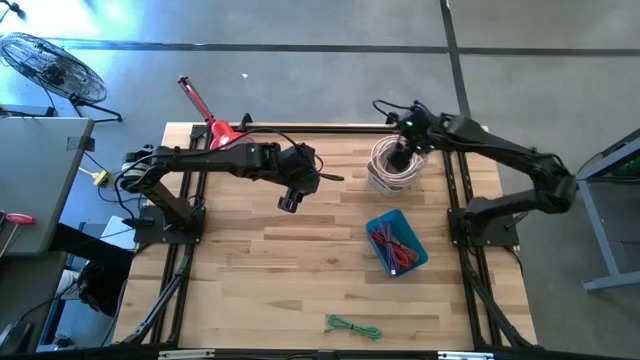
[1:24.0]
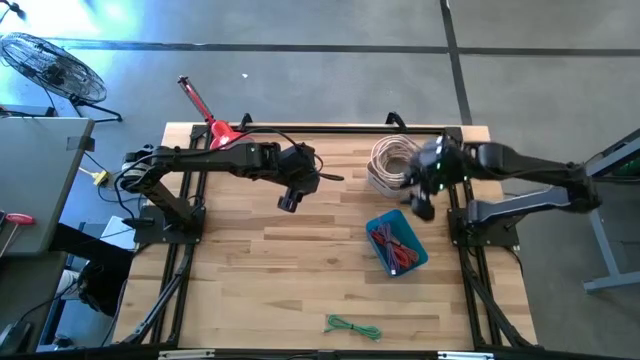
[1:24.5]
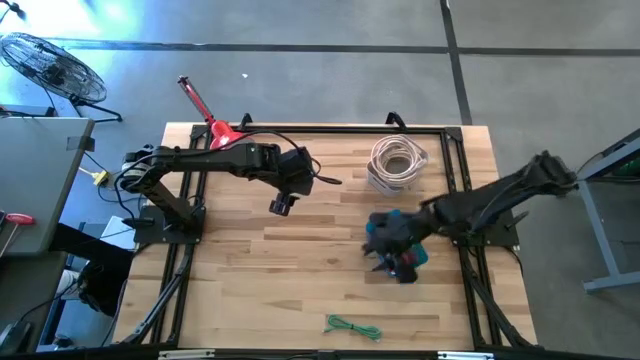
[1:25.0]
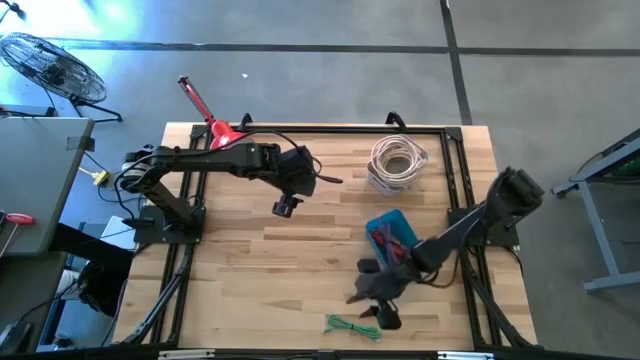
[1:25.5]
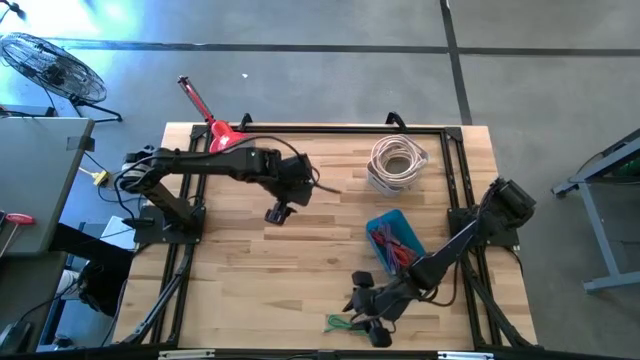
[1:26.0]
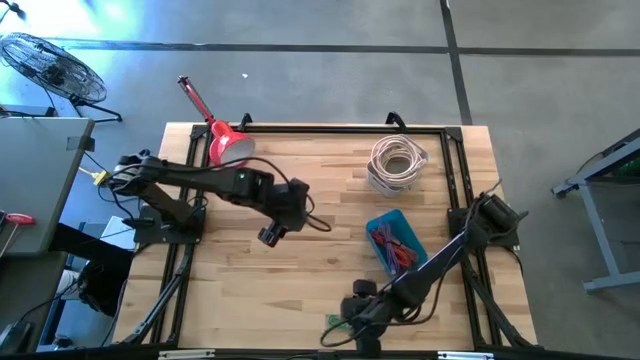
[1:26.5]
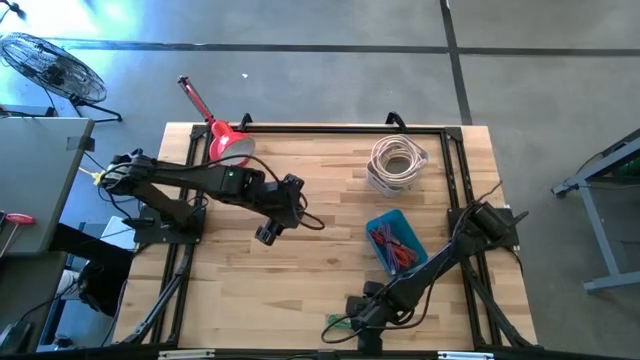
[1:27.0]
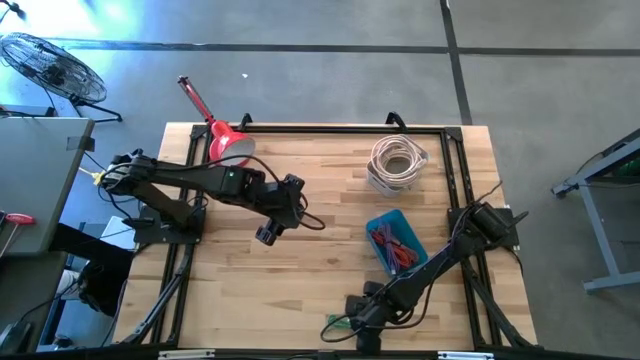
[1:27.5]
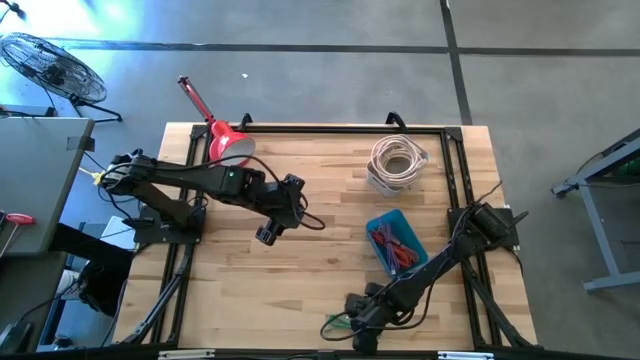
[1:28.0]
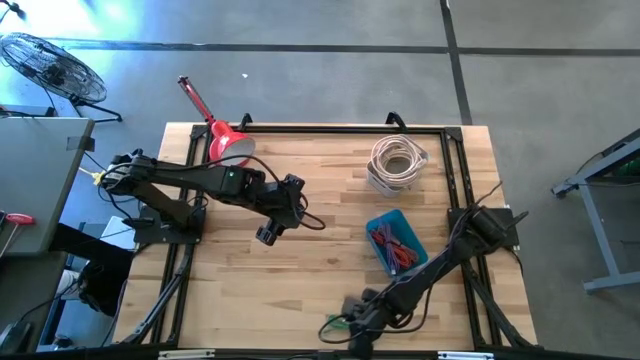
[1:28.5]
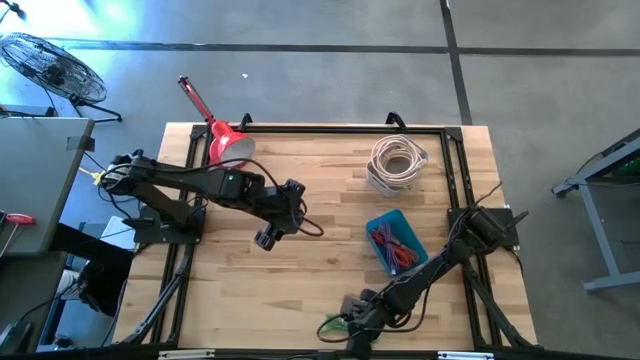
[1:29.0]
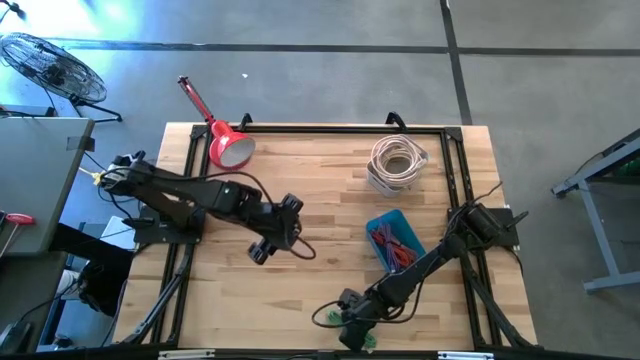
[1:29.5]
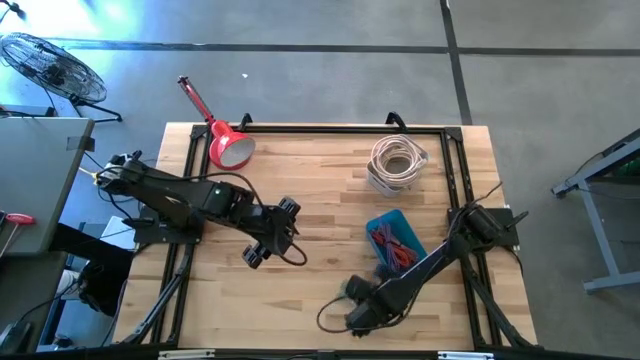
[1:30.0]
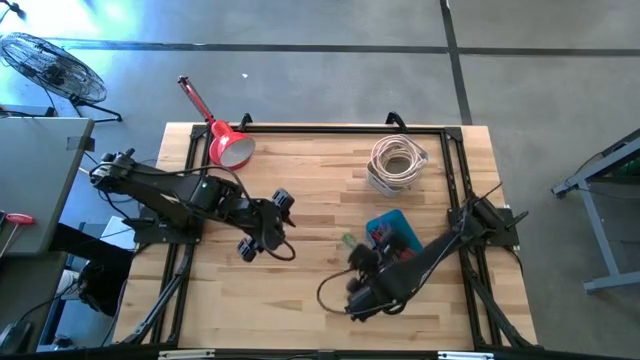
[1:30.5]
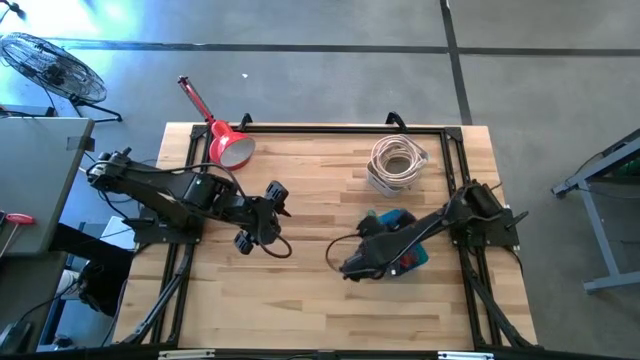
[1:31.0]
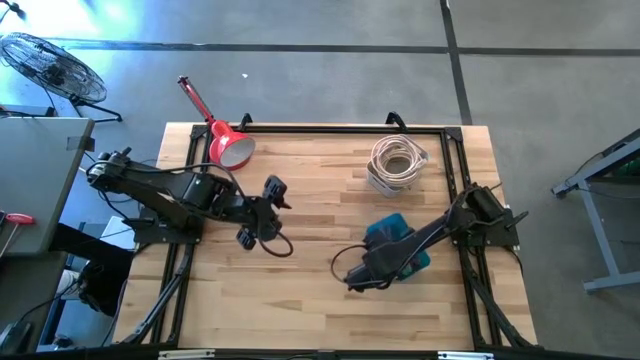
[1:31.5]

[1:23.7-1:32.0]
Task: Pick & Place USB Port
Put the green charger cable into the blue bin

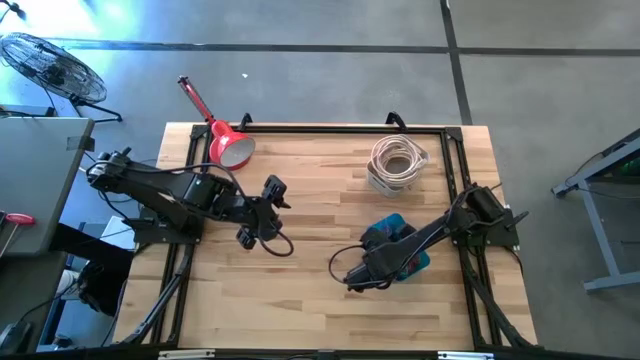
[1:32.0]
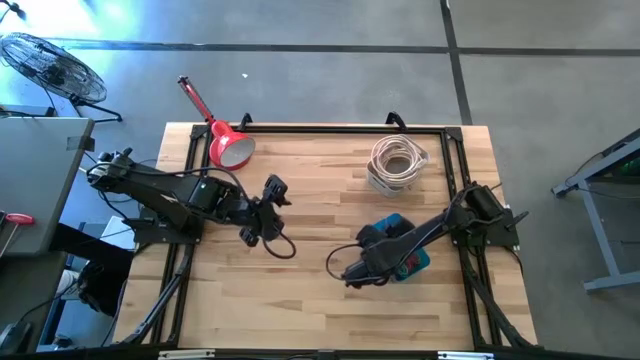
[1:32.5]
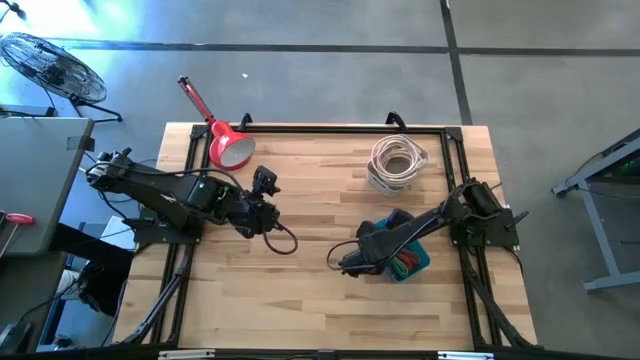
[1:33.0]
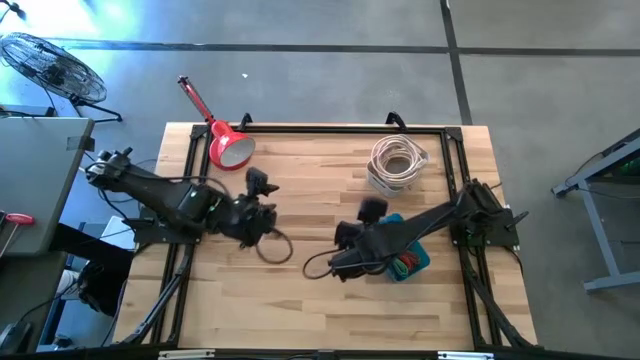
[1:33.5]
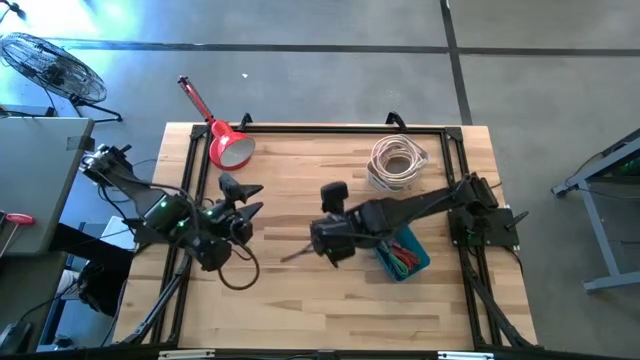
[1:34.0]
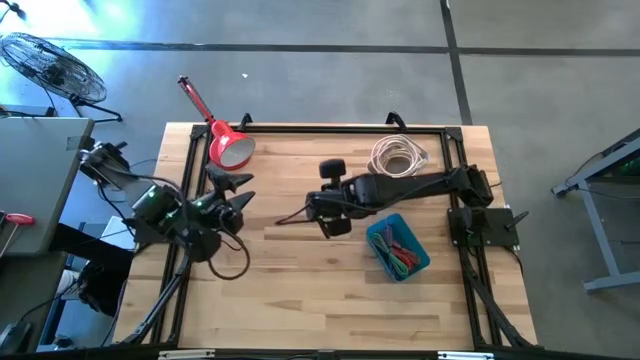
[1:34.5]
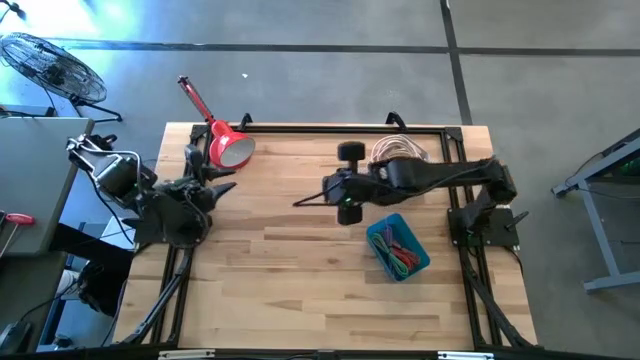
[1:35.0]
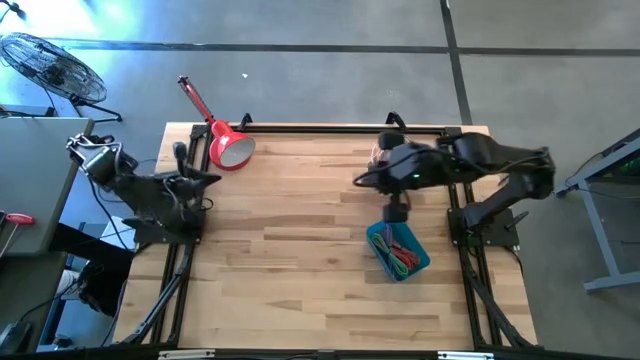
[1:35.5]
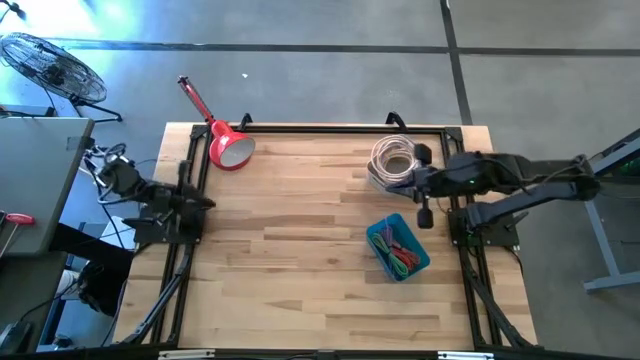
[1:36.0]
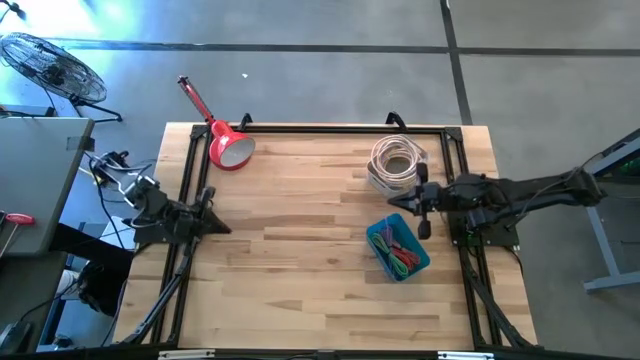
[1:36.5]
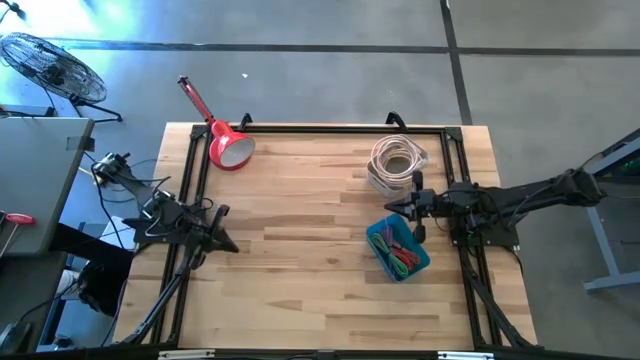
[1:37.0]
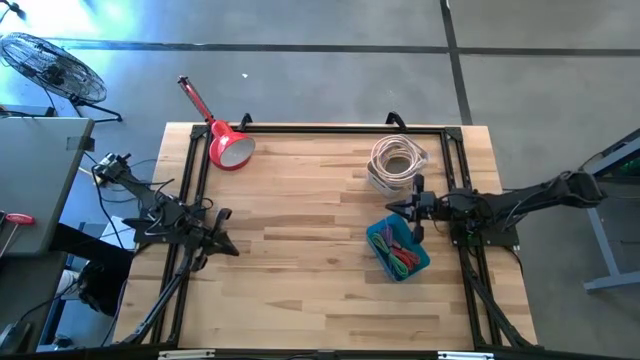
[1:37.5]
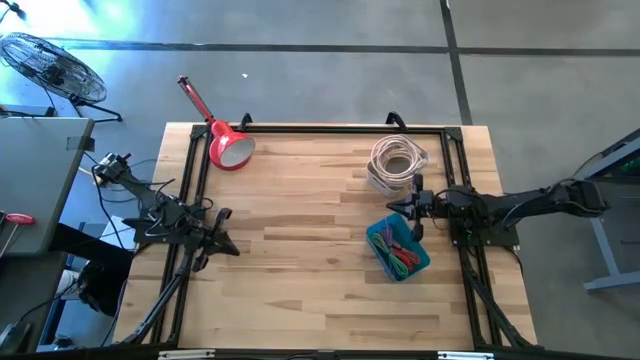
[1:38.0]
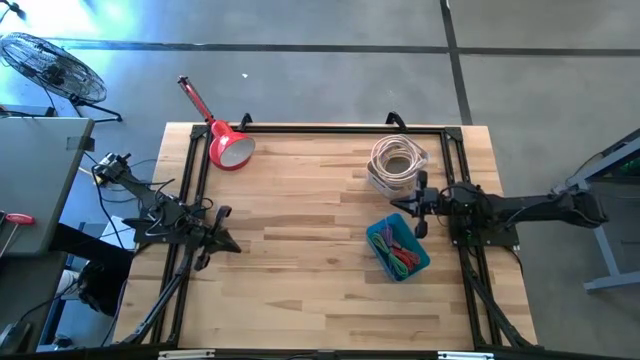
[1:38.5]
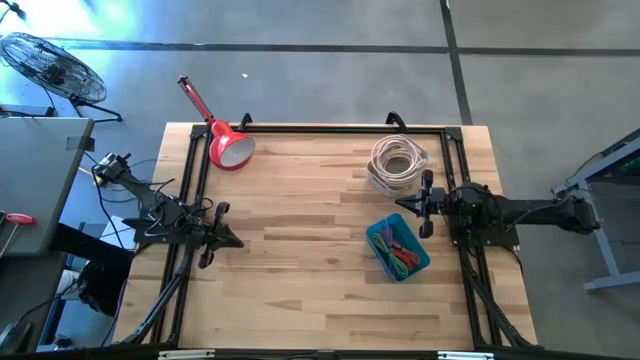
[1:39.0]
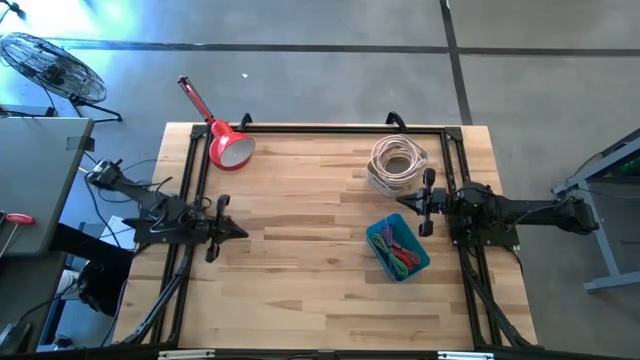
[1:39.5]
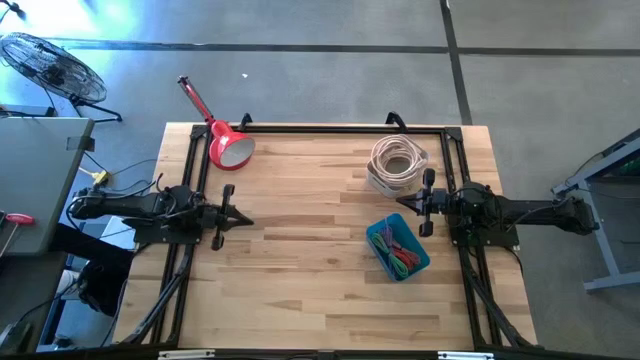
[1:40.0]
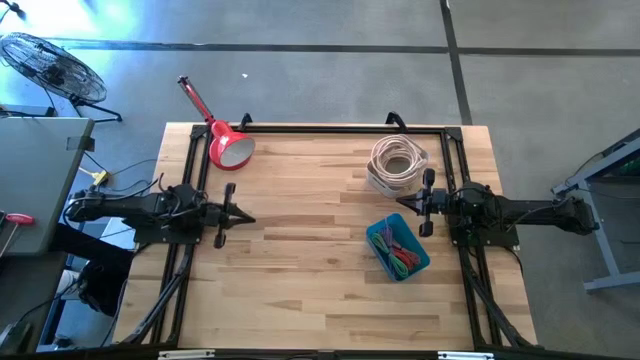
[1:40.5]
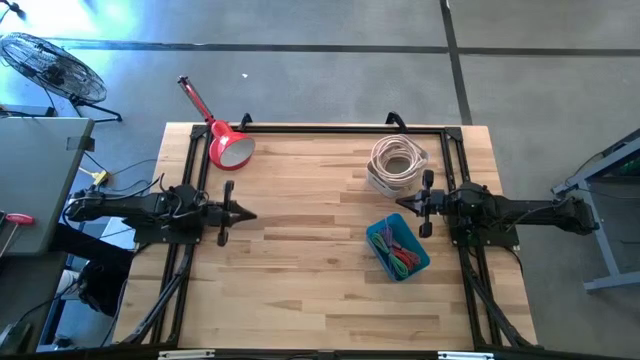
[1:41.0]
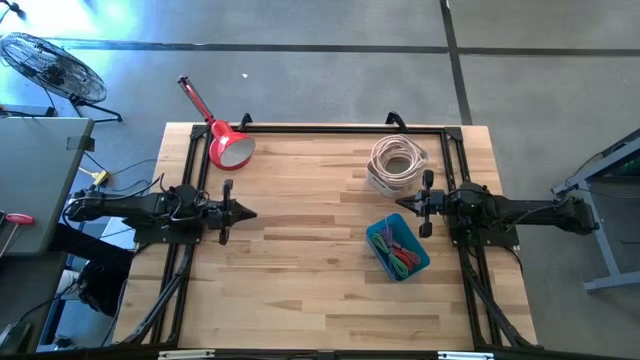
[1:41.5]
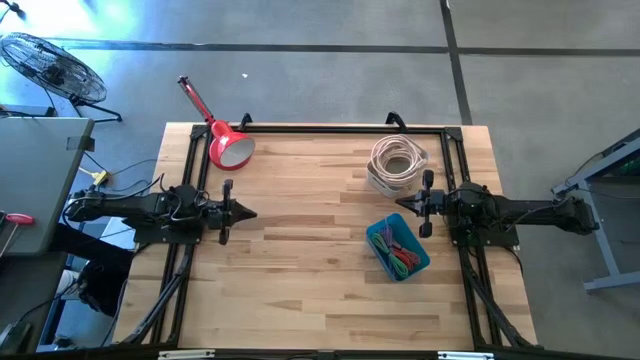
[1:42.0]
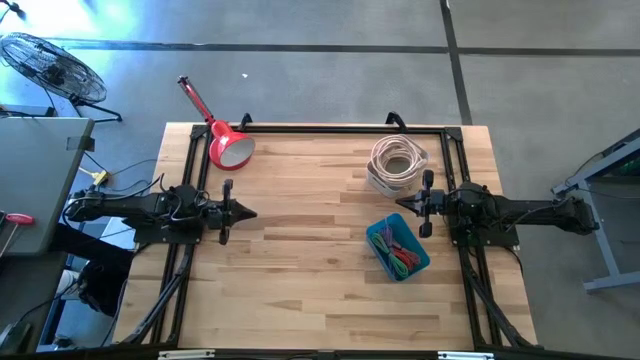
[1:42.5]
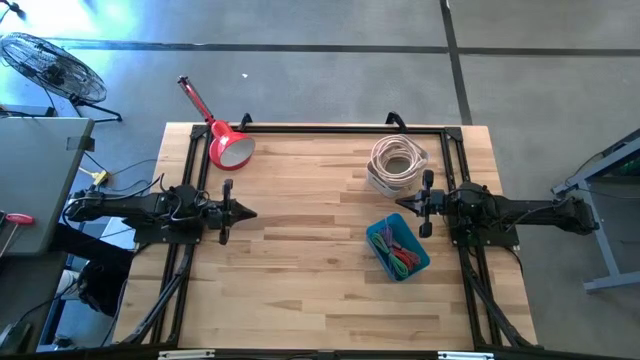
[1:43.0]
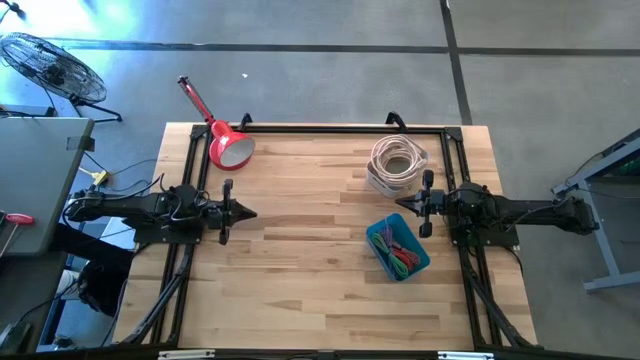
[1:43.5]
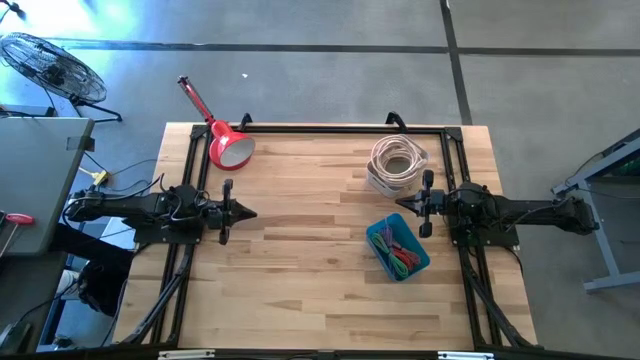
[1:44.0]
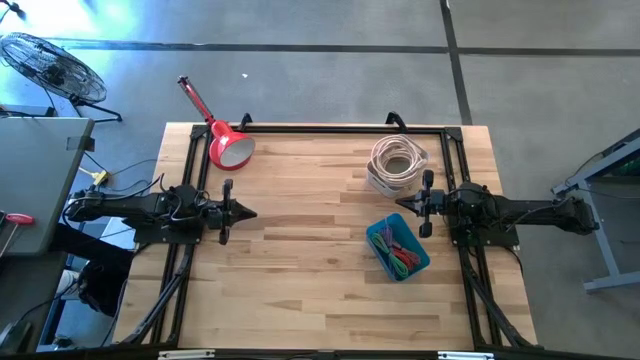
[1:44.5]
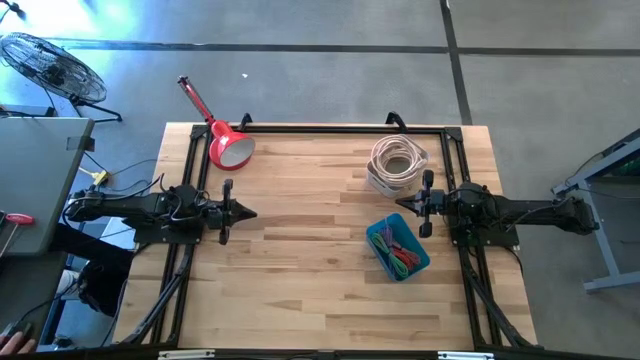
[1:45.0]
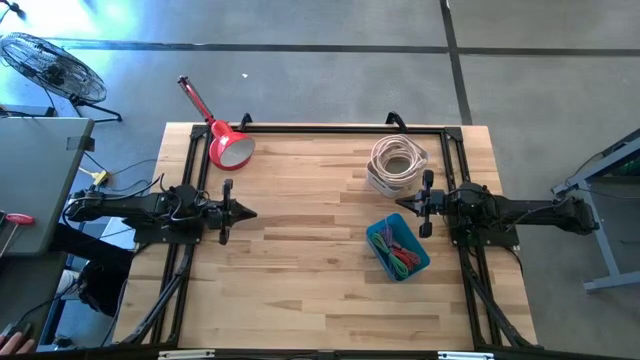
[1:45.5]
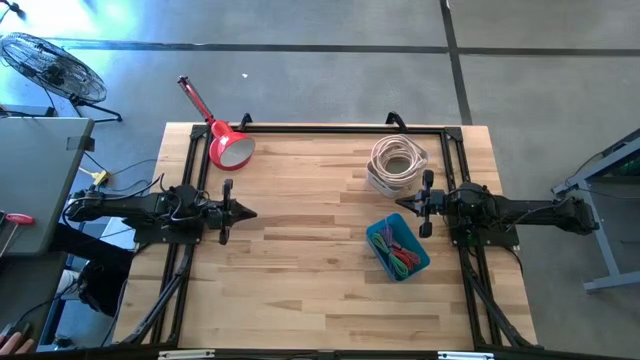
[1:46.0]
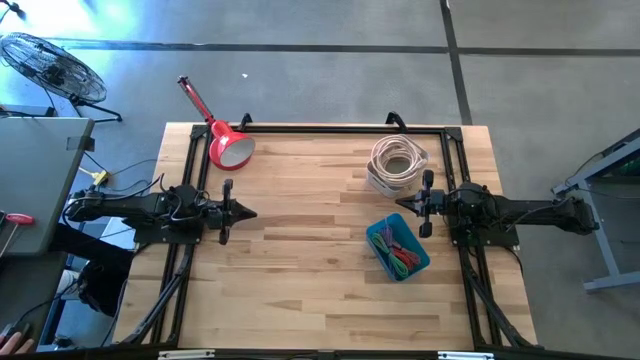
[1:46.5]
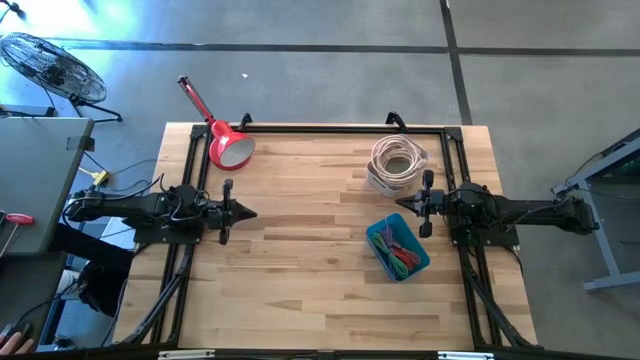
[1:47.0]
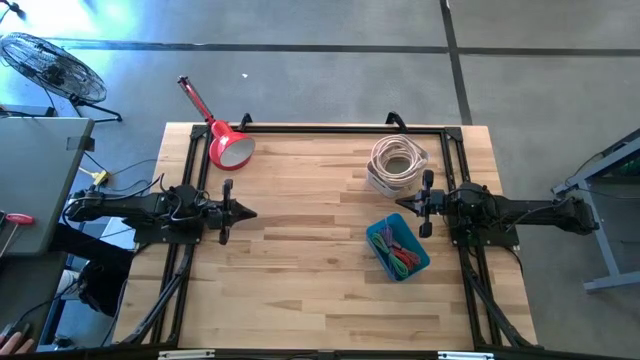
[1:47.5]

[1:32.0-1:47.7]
Return to Home Position
